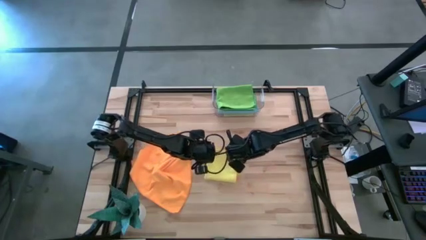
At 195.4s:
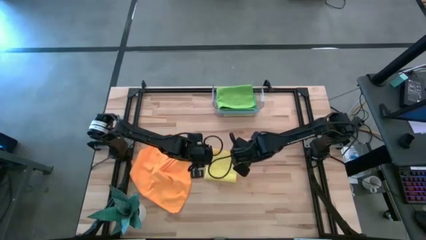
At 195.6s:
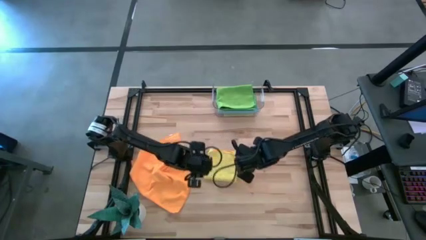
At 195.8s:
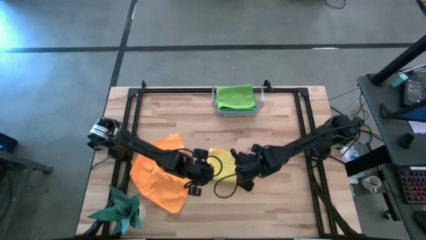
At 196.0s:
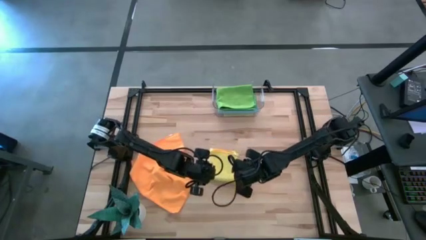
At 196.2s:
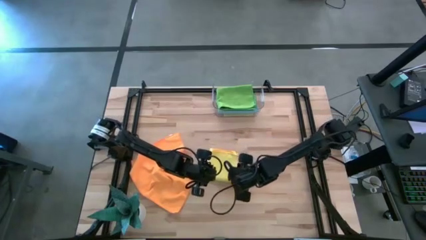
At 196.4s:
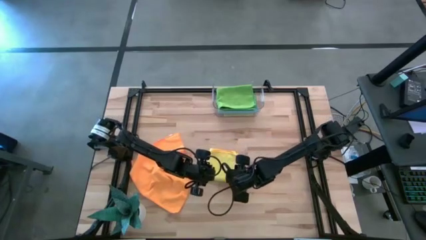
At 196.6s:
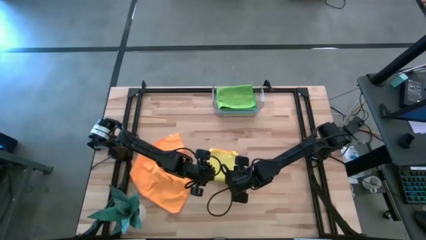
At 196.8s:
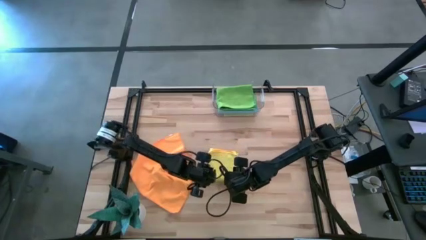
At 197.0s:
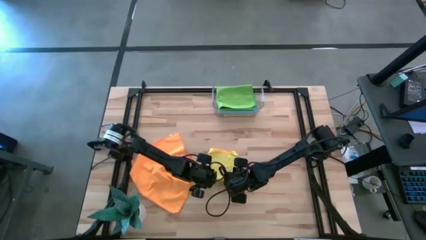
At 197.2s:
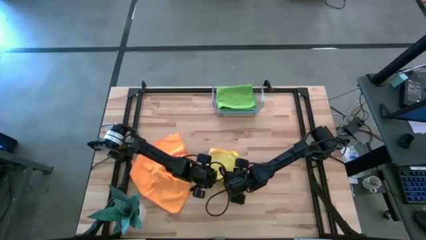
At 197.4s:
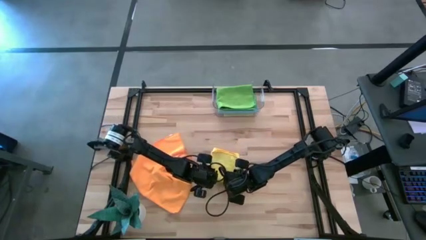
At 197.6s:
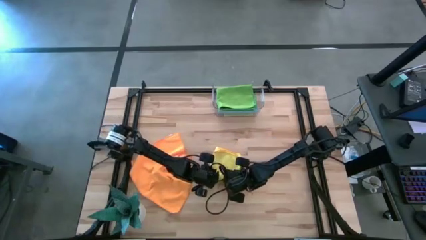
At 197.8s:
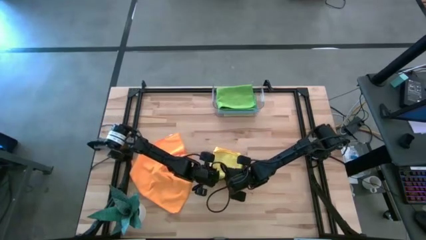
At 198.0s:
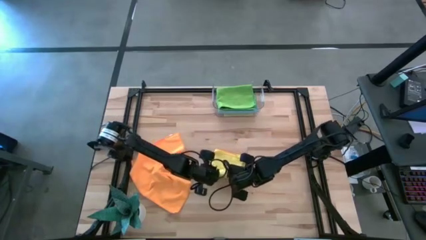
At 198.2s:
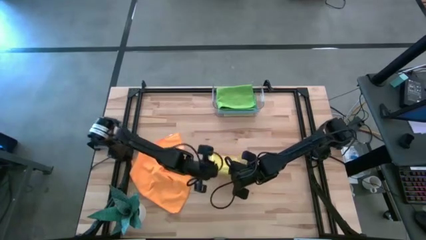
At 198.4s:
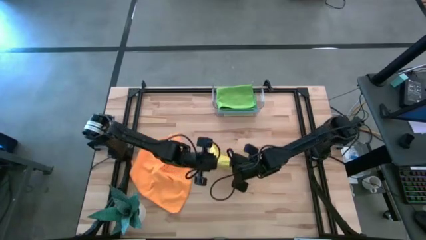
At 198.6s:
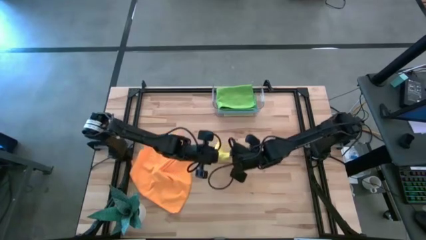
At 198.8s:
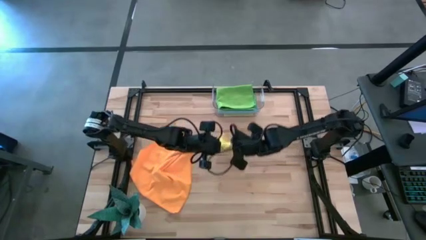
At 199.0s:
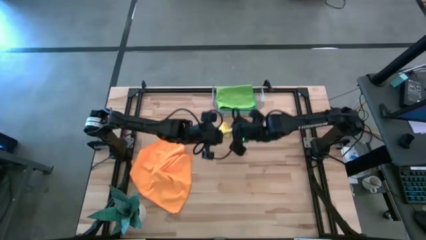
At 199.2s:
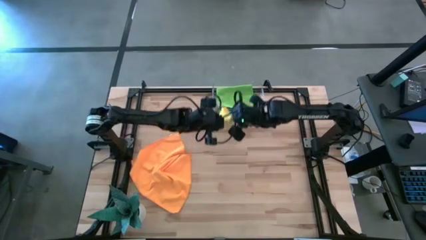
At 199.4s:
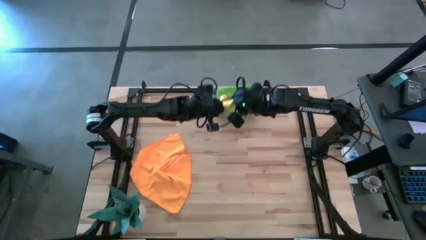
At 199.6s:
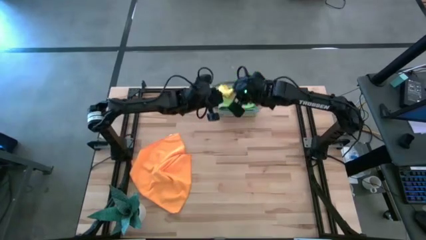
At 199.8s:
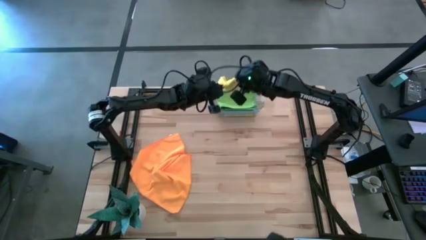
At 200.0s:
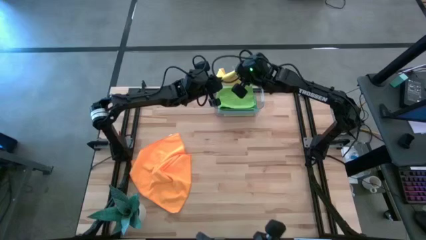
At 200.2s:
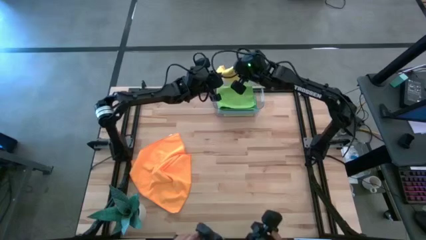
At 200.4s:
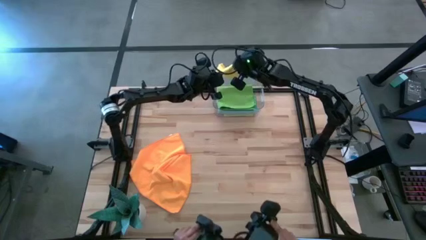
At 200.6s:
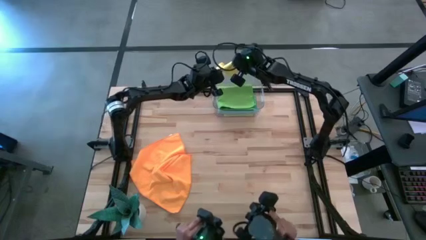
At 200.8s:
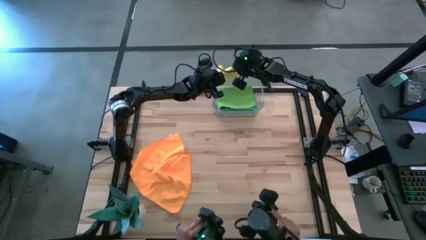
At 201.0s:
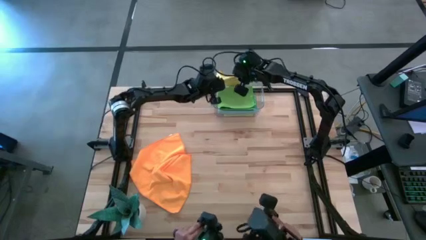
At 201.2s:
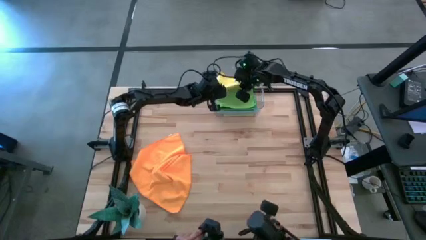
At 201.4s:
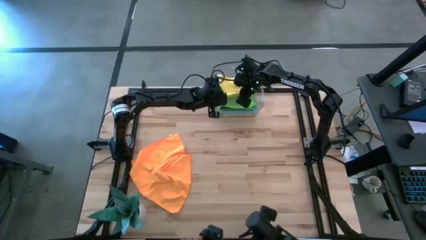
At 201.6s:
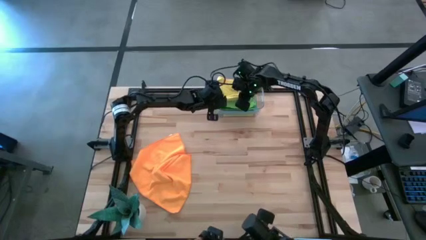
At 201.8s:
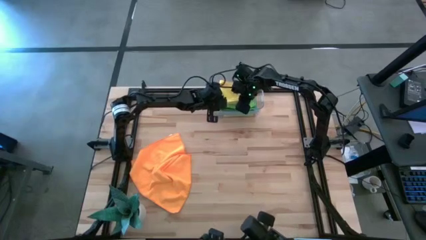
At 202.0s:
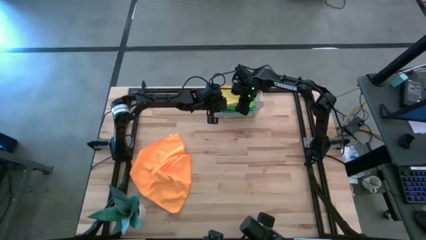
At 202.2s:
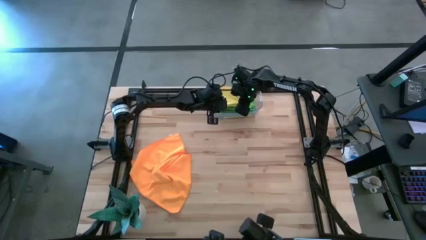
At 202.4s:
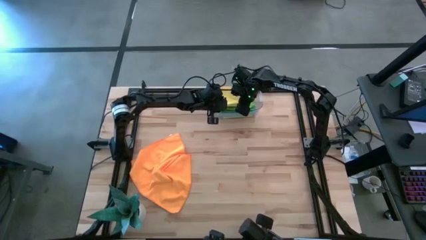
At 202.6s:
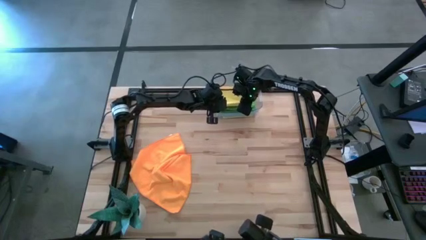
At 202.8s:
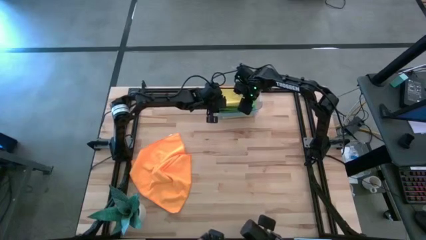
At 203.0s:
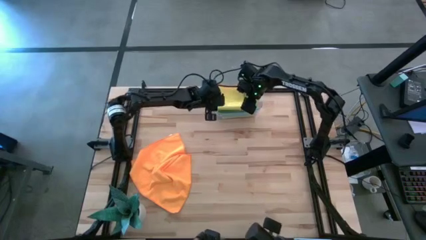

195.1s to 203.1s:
Task: Fold microfiber towels
Stack the yellow microfiber cloth on top of the green microfiber cloth in the transparent bin

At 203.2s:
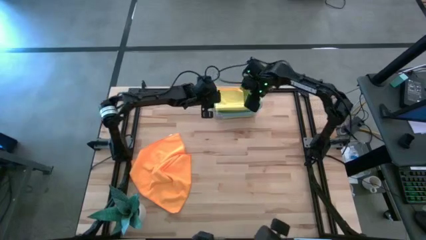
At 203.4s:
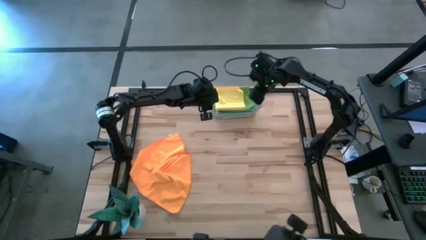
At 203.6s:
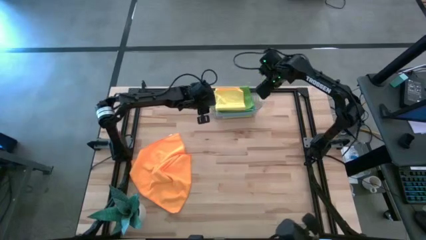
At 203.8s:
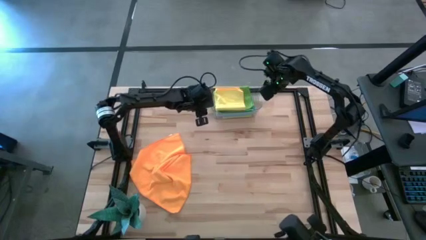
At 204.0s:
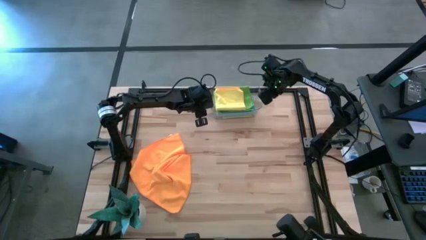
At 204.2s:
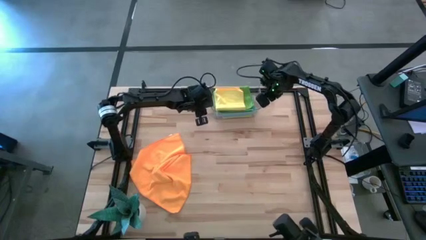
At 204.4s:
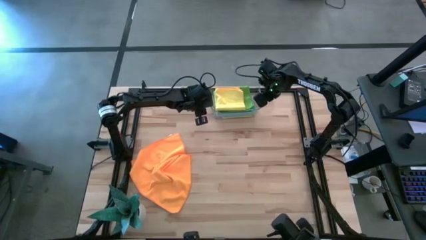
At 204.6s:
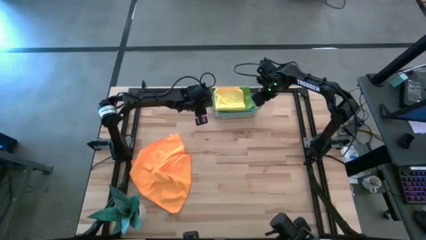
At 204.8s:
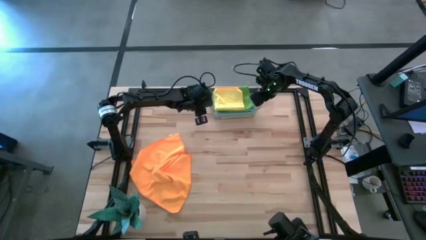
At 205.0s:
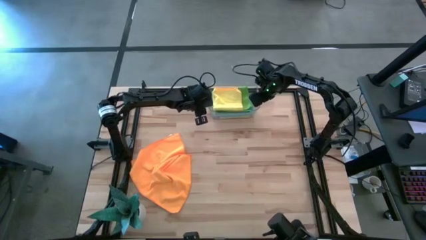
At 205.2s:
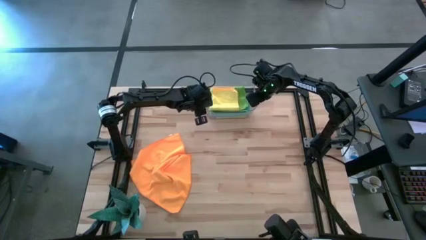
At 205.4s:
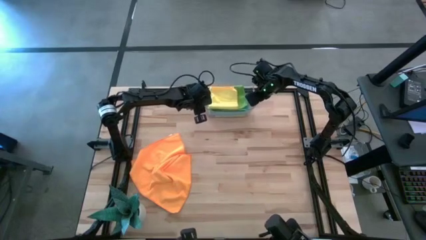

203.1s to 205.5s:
Adjust the transparent bin

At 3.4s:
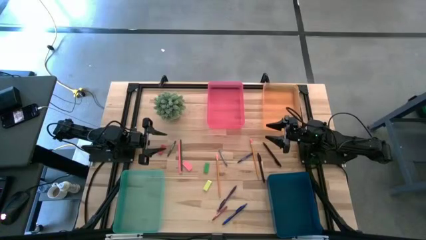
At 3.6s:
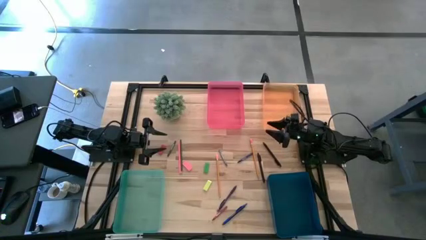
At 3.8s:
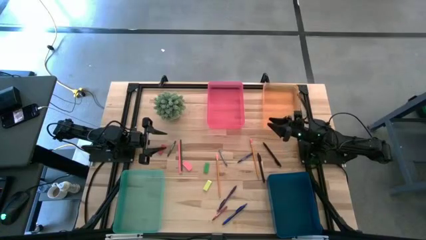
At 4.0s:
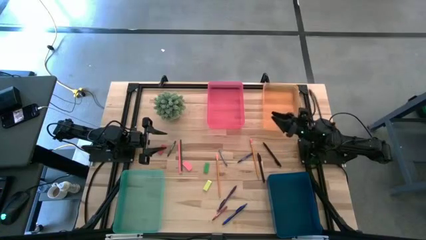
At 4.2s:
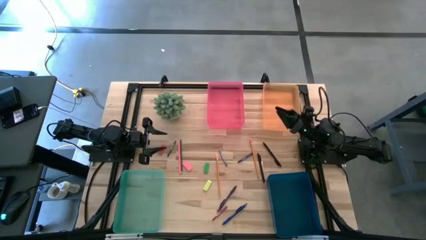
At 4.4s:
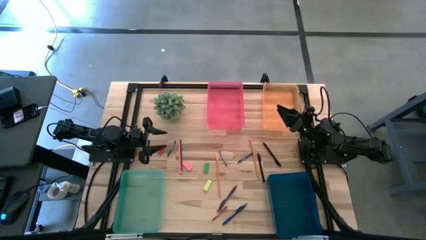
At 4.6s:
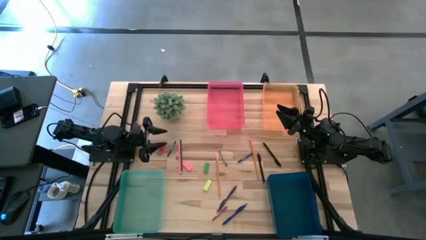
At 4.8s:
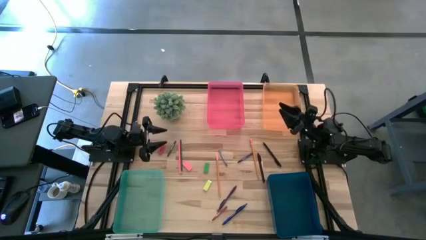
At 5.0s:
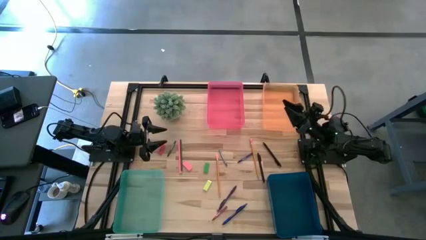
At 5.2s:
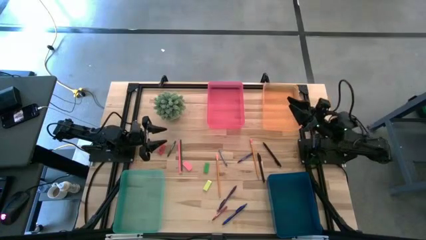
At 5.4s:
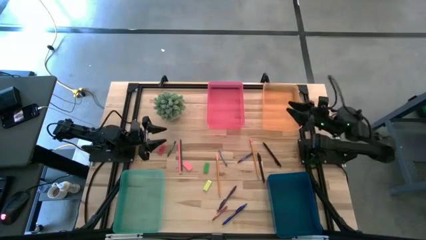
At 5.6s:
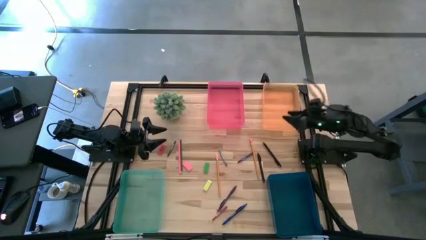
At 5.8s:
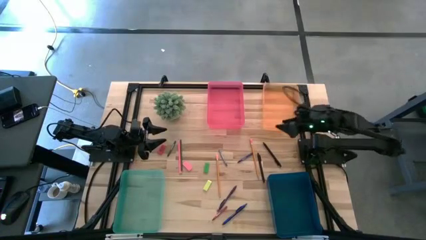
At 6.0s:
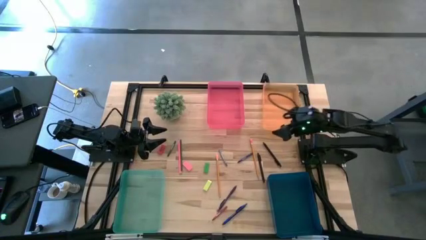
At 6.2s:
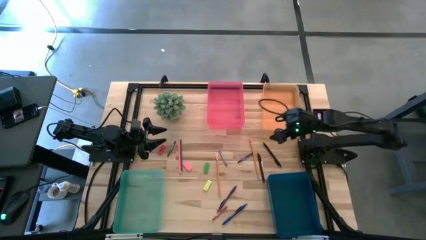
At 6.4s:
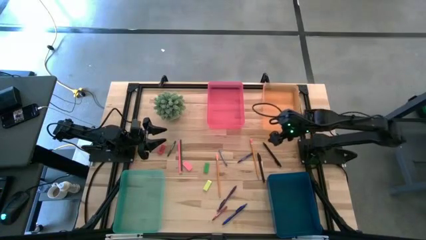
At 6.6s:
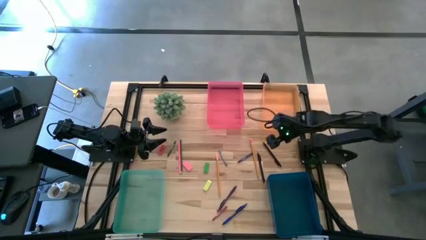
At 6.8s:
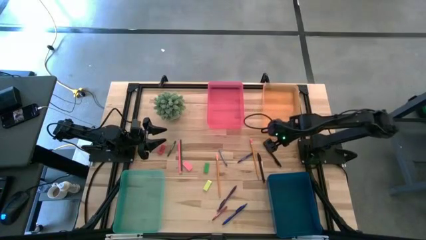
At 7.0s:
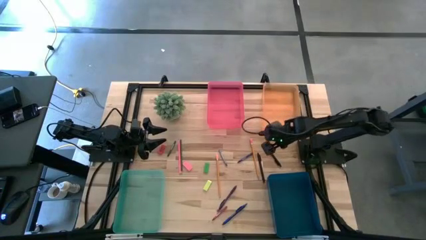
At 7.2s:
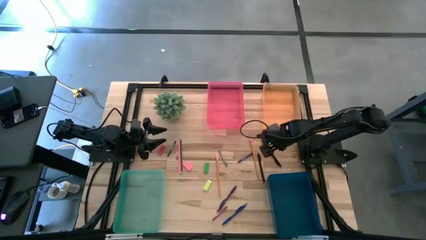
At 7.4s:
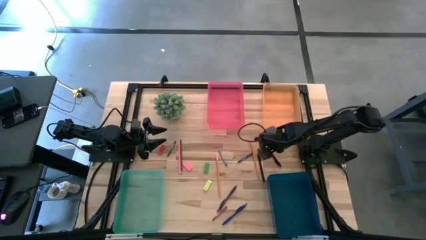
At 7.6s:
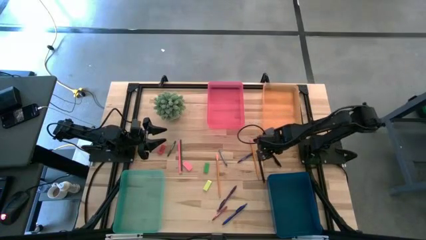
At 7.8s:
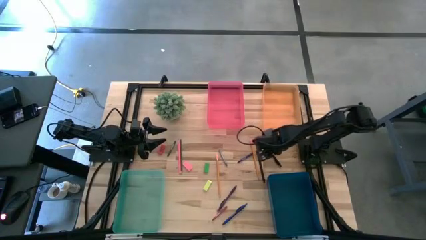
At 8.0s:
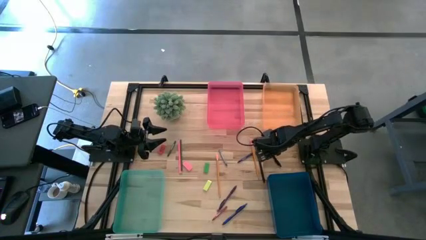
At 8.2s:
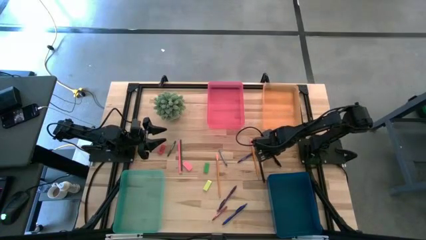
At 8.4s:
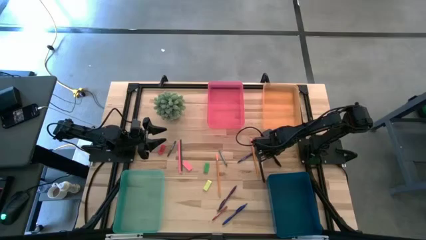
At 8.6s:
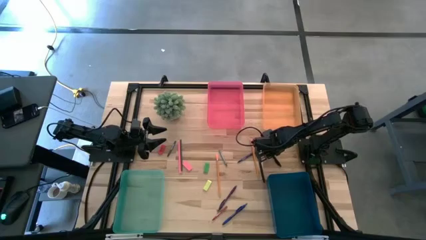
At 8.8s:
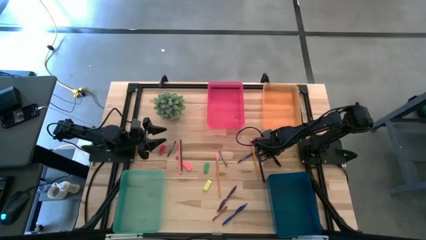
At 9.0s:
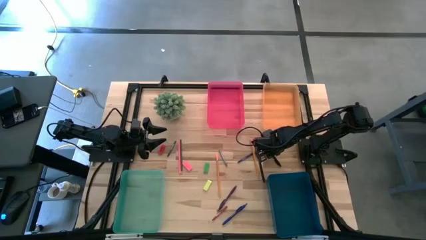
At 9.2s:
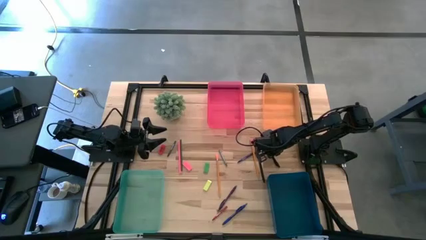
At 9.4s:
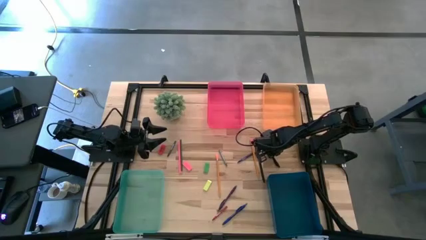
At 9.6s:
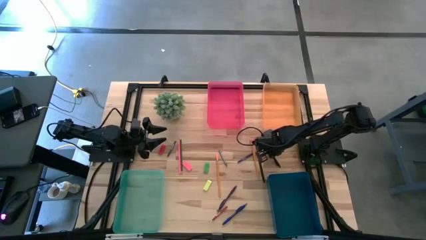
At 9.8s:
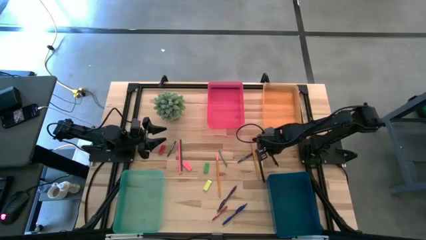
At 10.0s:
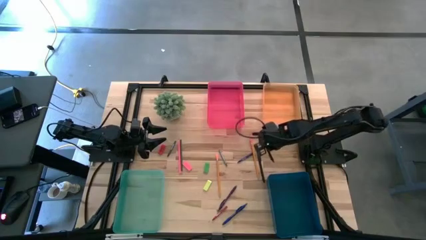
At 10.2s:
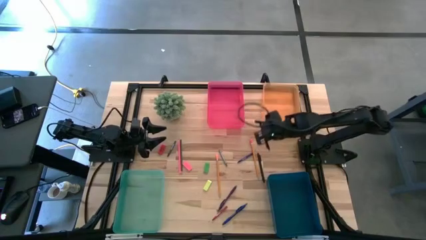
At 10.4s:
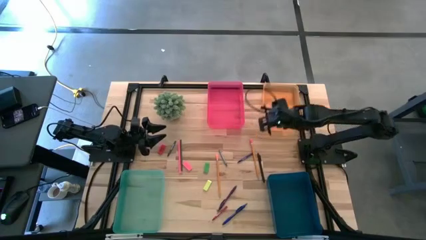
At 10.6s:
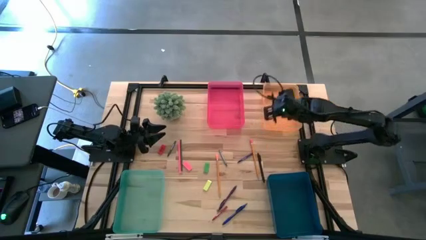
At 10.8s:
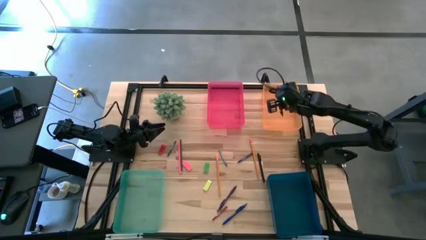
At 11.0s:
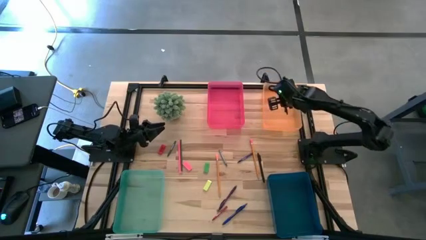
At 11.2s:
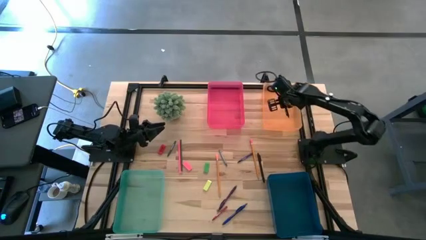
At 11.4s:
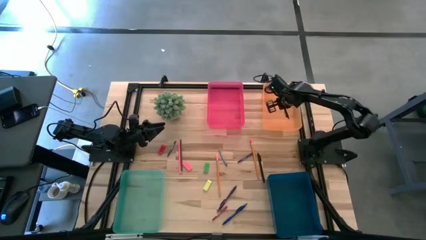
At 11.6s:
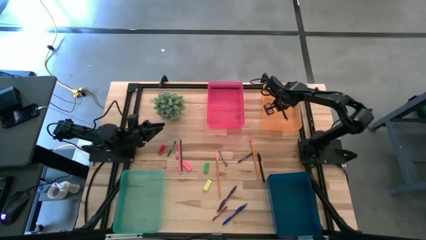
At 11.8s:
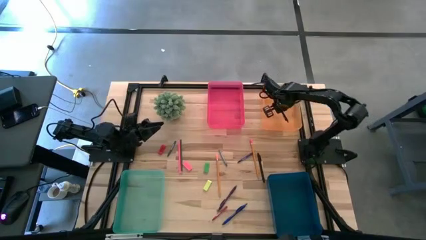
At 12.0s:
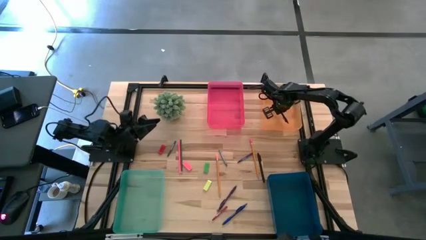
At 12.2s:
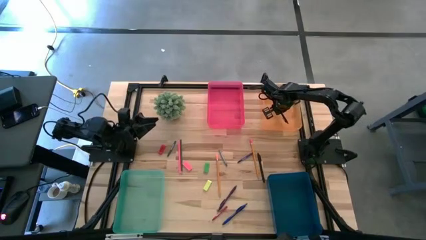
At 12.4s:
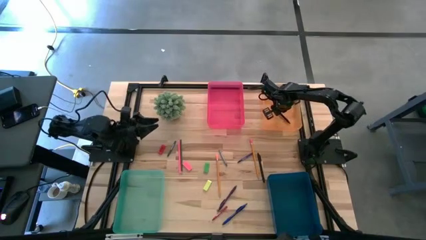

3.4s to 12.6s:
Task: Sort crayons/erasers/pens/pencils in bins
Put the right black pen into the orange bin
